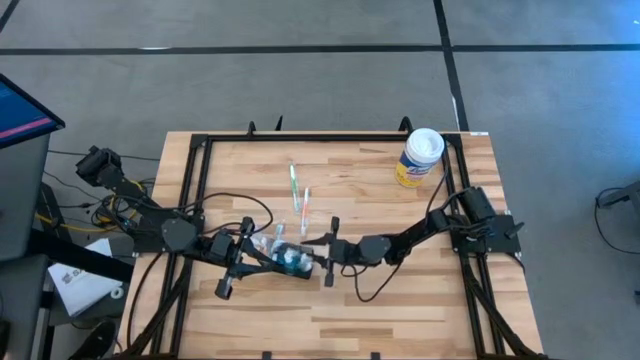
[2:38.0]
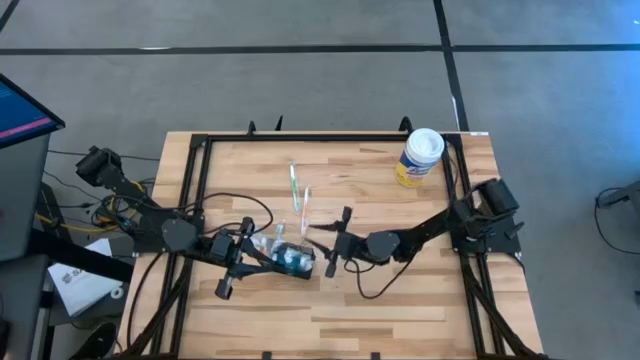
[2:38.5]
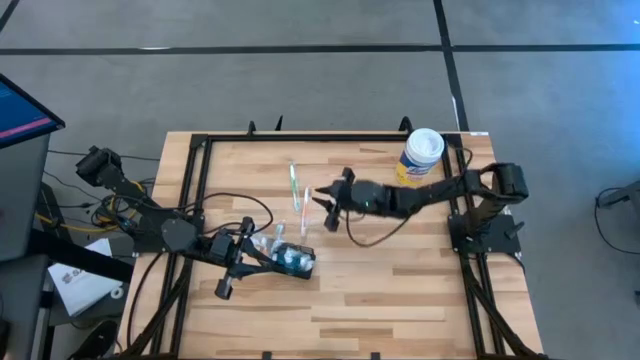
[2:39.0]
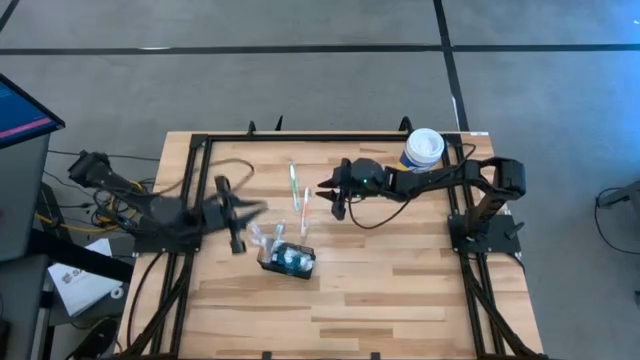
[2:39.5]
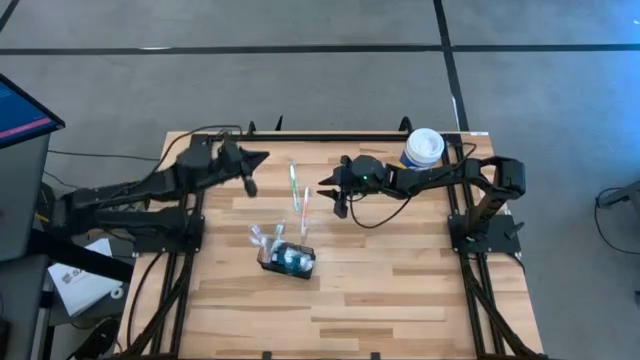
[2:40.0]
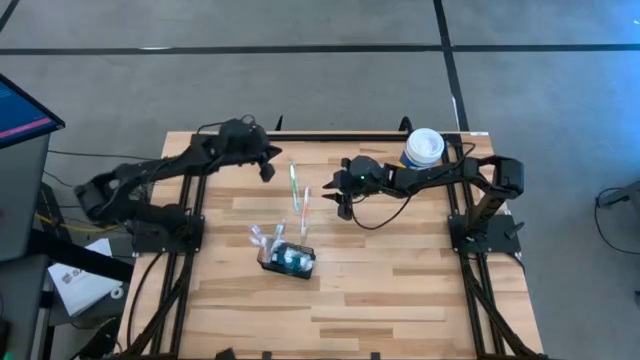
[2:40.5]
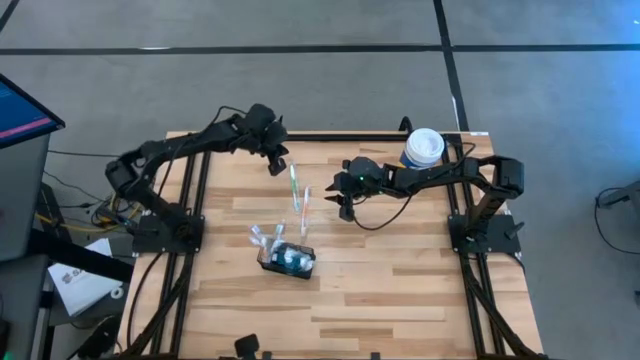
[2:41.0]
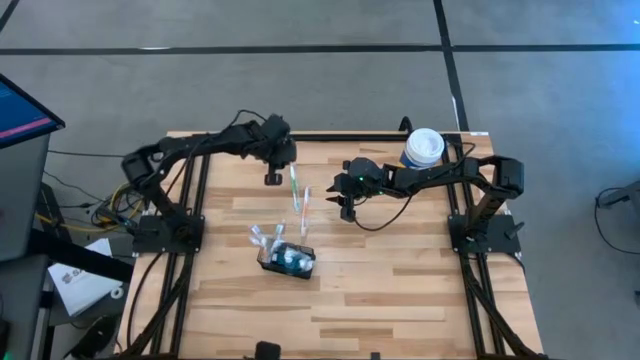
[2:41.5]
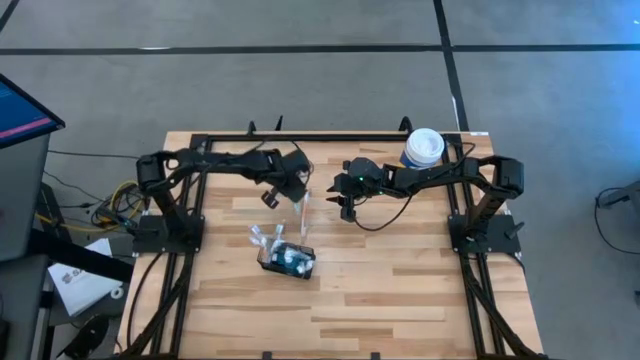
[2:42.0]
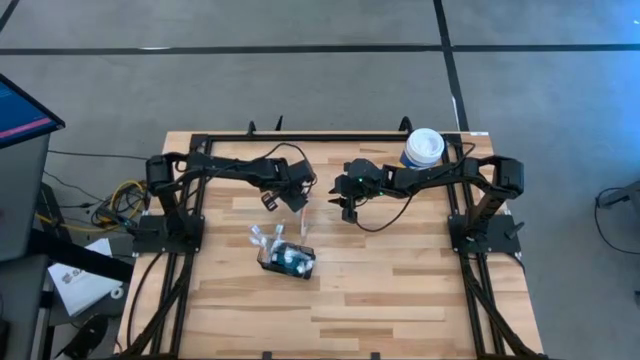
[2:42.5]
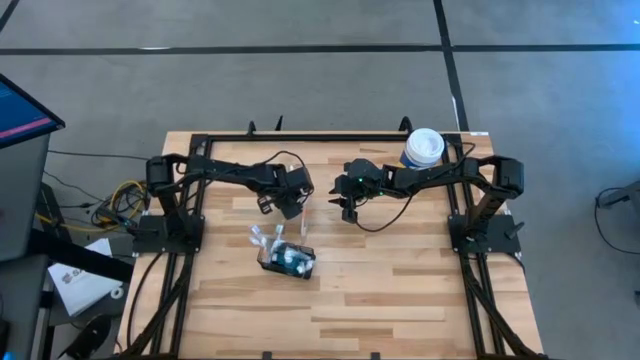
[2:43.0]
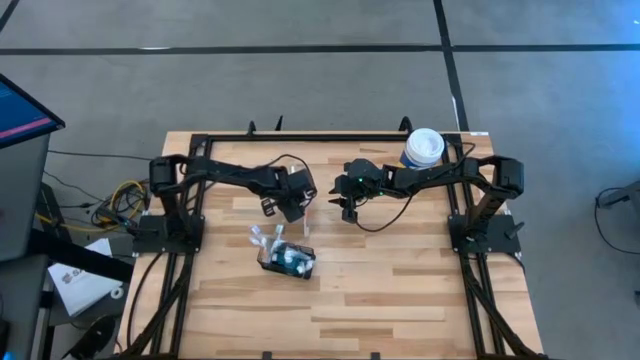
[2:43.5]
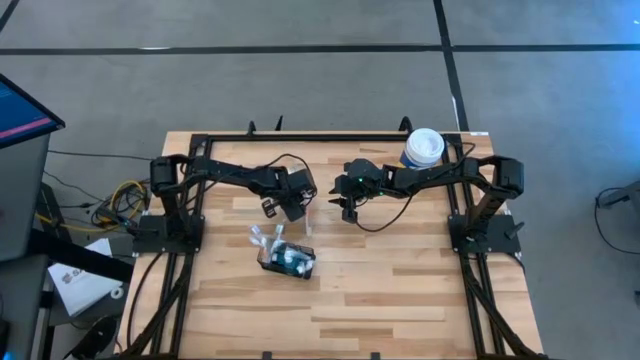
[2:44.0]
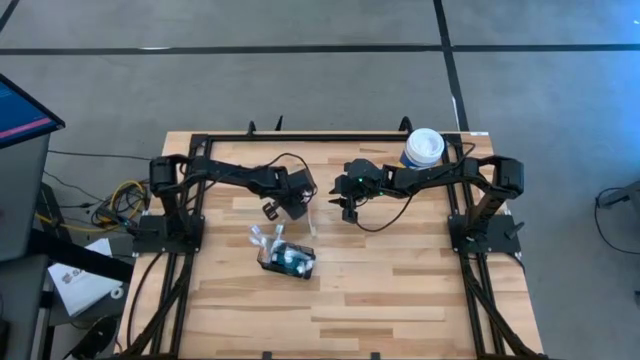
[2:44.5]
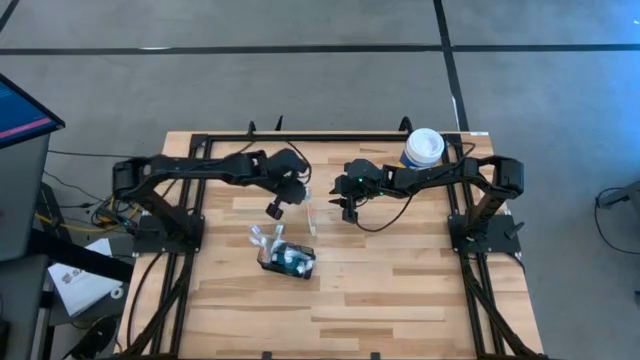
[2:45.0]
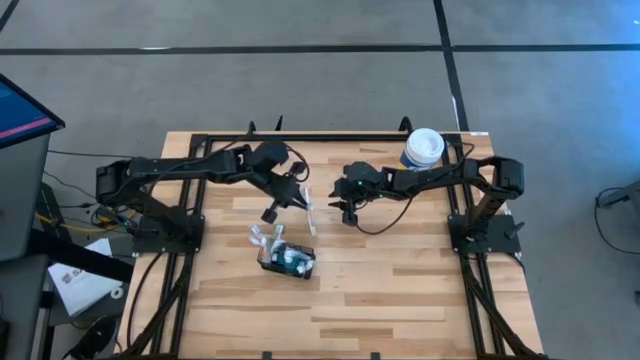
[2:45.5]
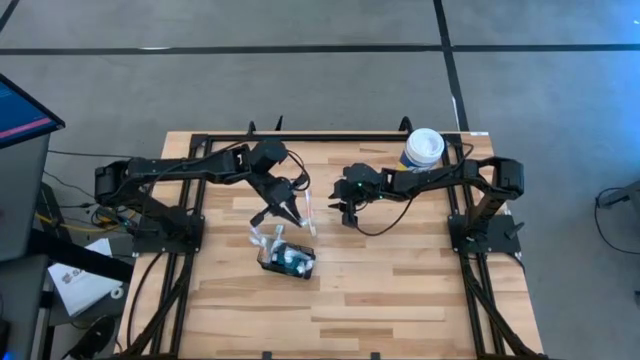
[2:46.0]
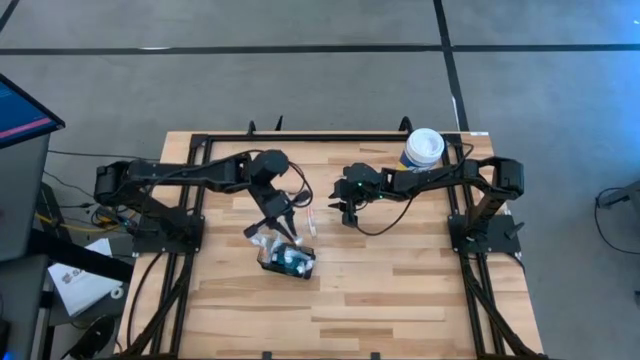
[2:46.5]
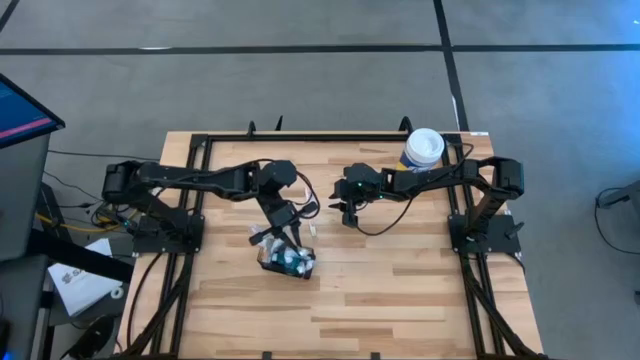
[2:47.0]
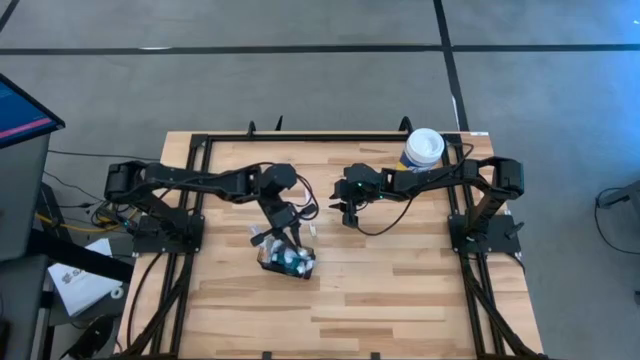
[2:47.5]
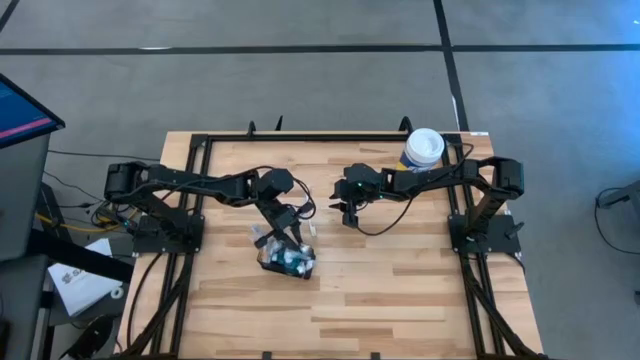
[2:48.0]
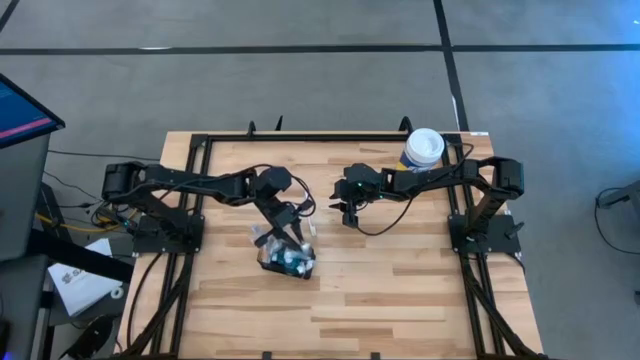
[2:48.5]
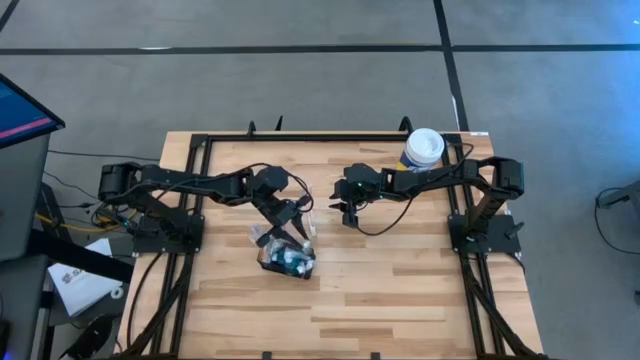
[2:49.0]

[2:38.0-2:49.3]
Task: Pick & Place toothbrushing station
Put the green toothbrush into the wire organizer

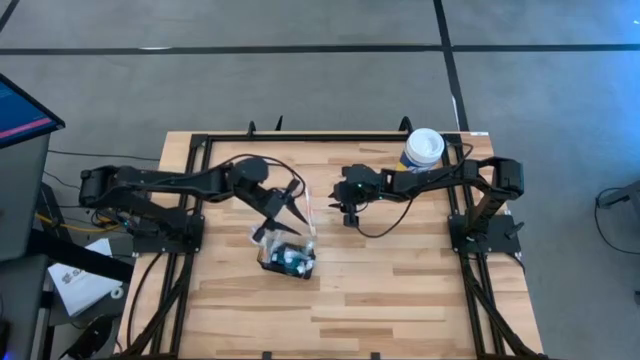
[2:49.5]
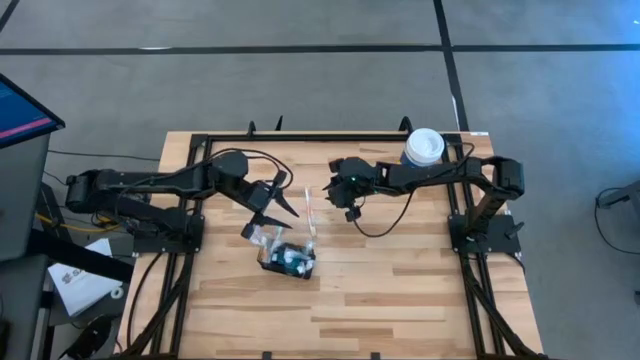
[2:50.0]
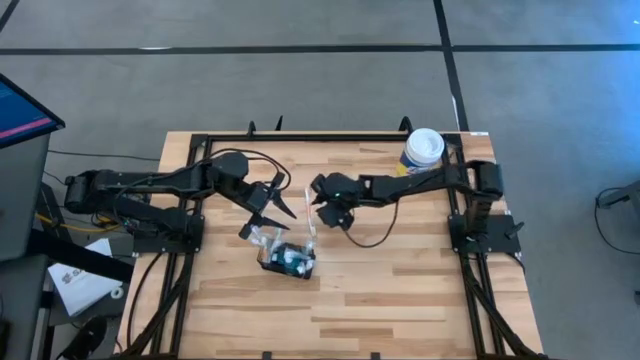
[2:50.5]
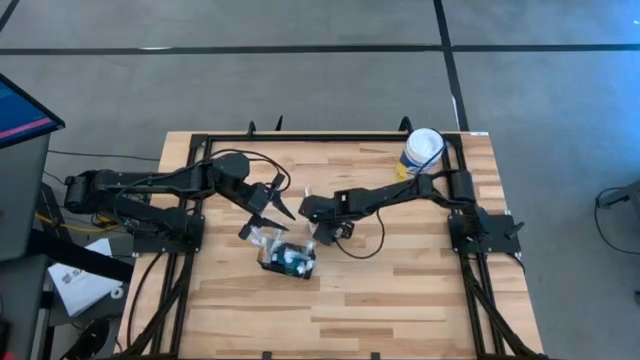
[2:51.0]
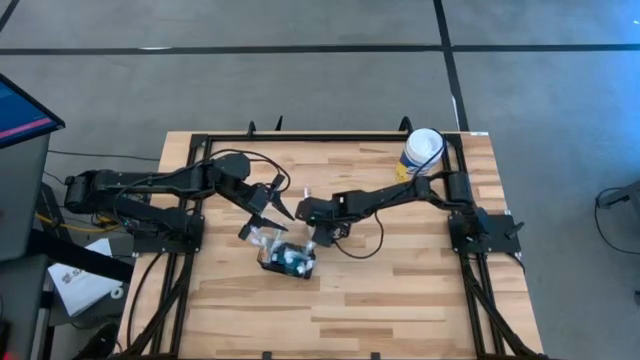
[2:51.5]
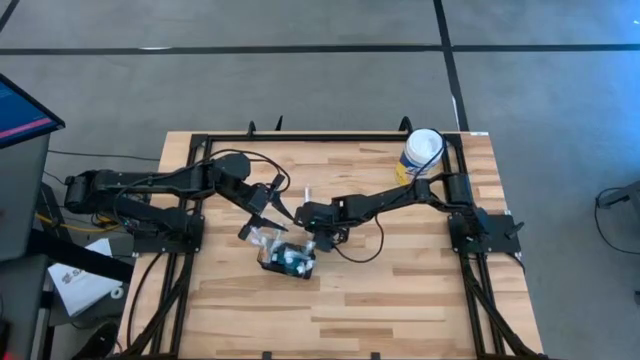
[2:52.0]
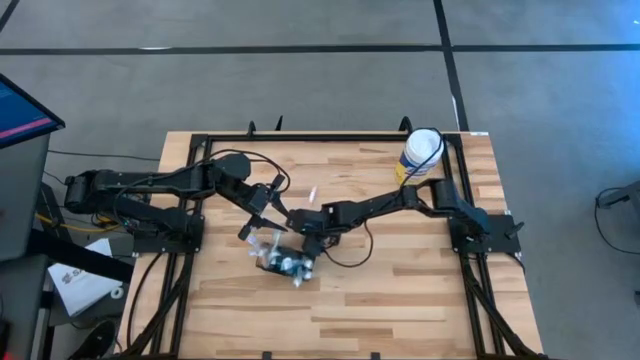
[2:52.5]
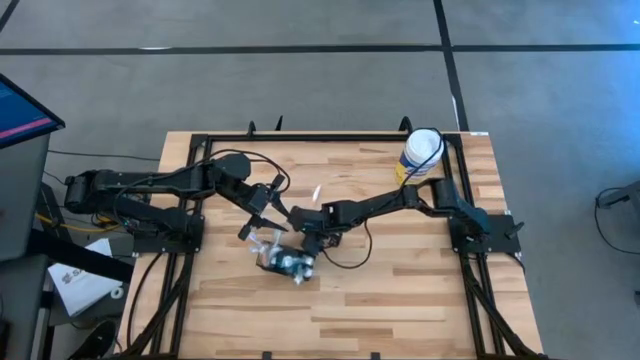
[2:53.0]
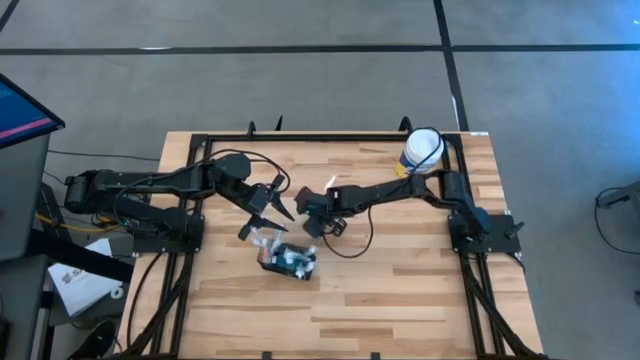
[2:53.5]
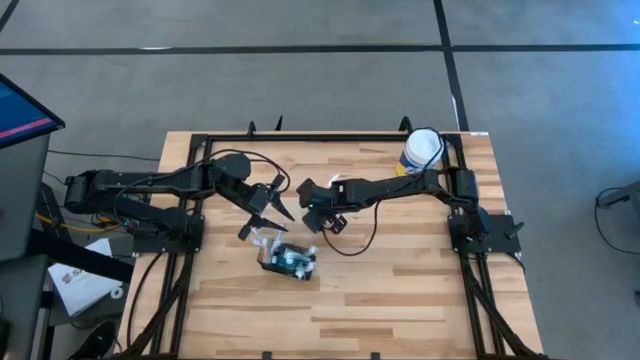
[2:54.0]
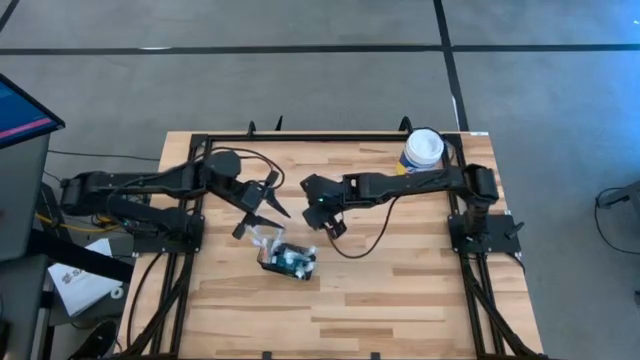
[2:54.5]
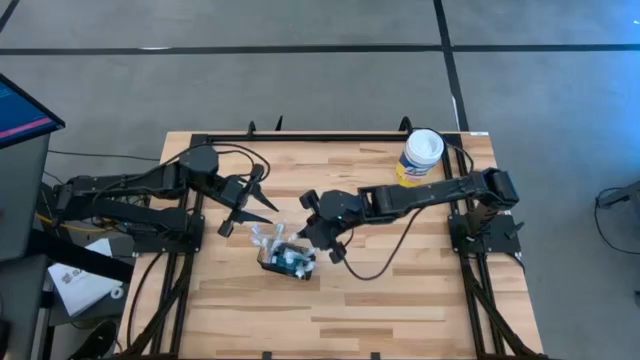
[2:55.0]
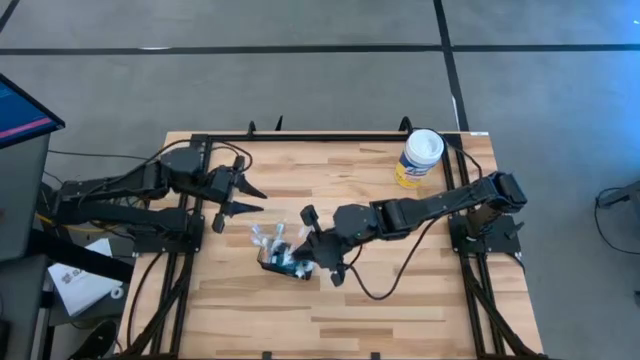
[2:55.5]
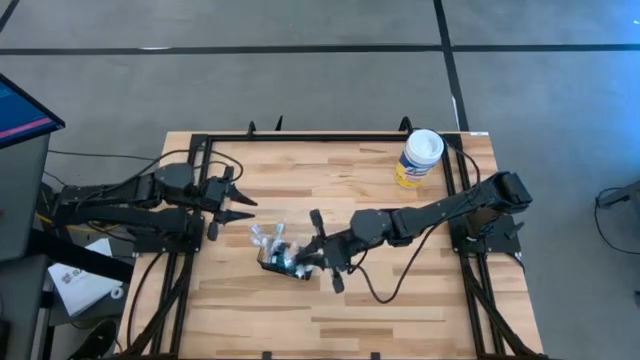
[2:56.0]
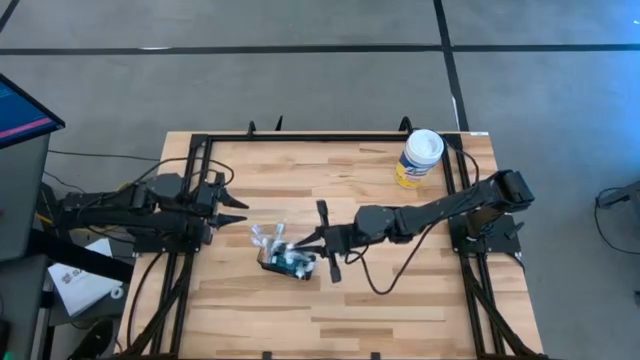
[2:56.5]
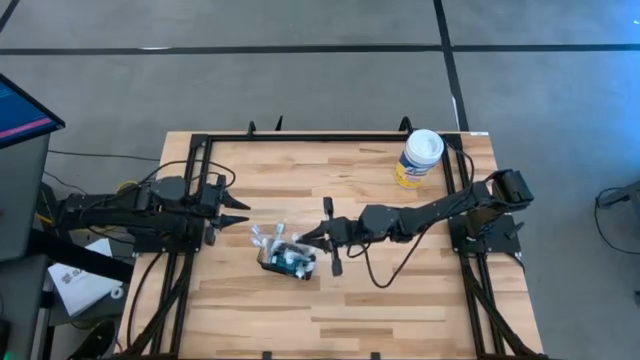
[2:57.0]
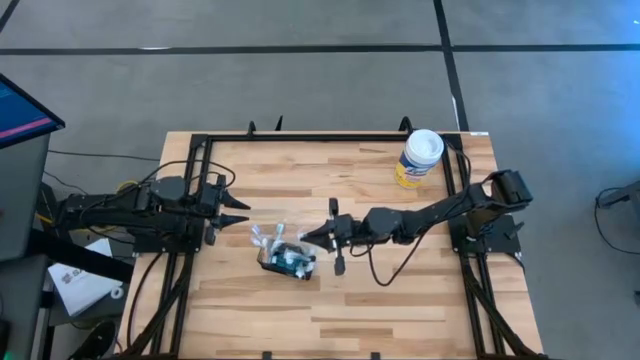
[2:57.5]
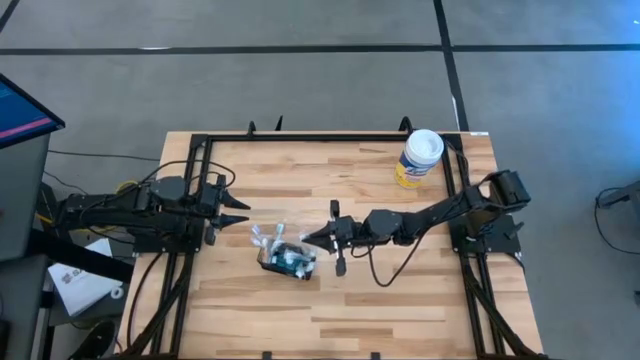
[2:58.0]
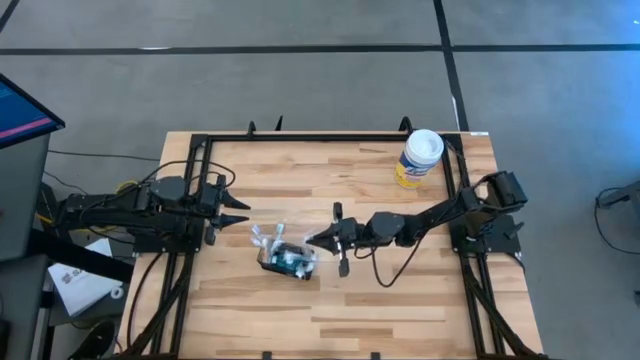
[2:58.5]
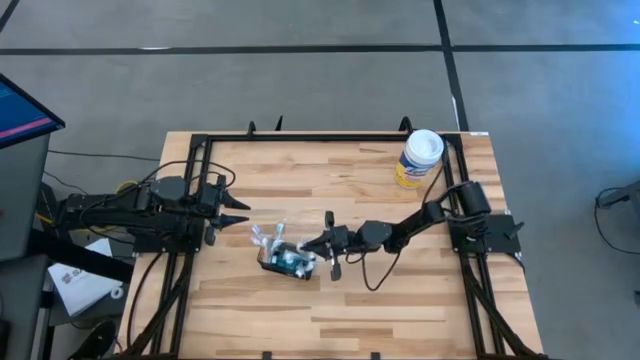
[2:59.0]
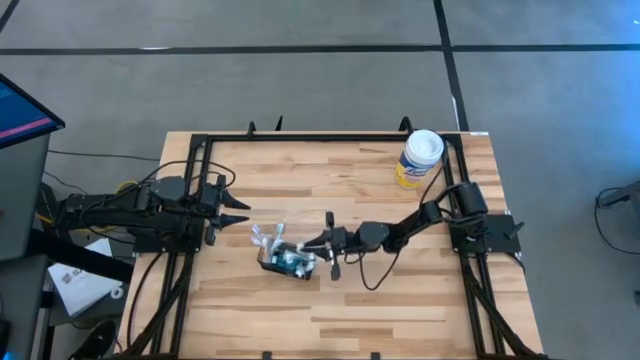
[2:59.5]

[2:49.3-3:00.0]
Put the orange toothbrush into the wire organizer
